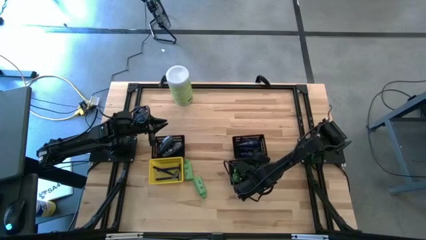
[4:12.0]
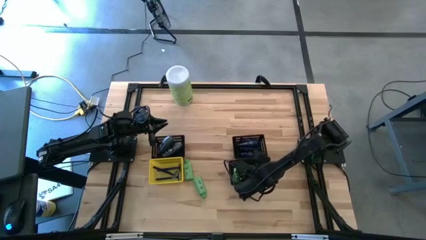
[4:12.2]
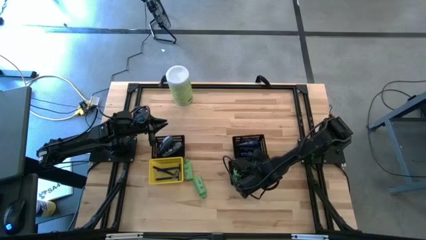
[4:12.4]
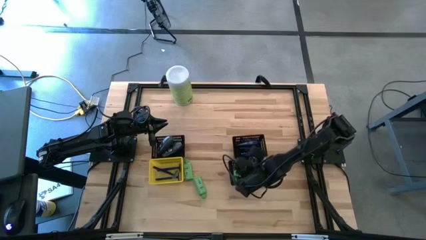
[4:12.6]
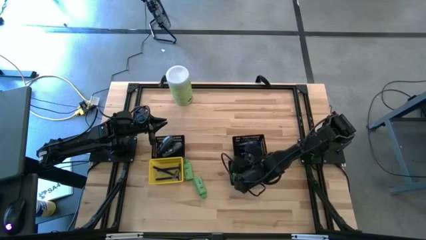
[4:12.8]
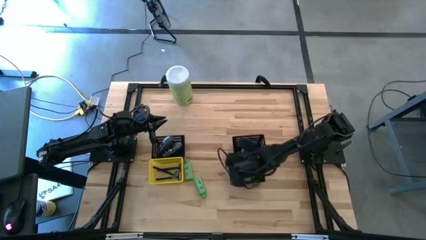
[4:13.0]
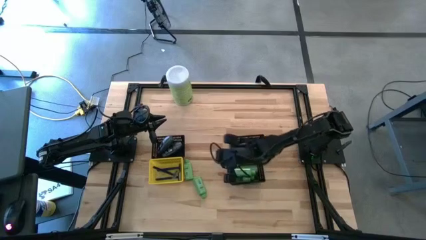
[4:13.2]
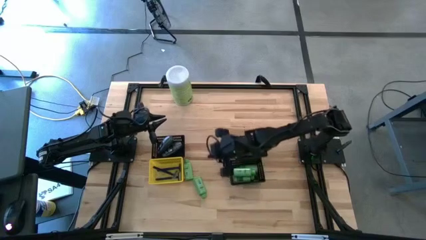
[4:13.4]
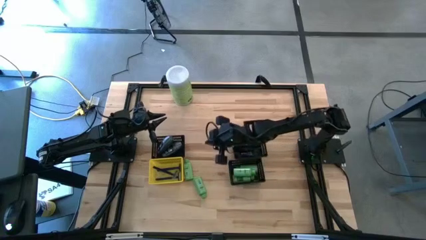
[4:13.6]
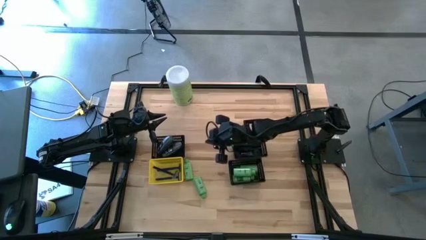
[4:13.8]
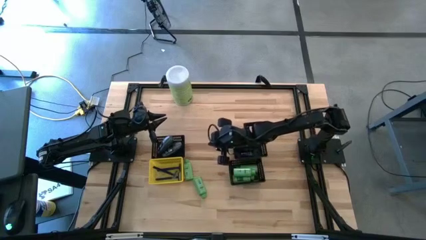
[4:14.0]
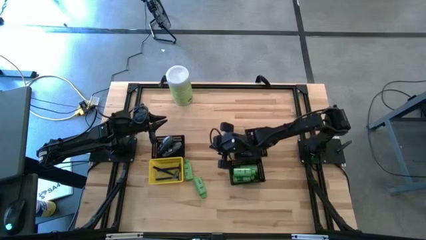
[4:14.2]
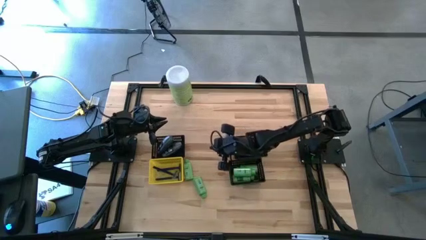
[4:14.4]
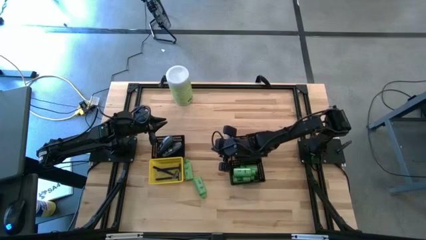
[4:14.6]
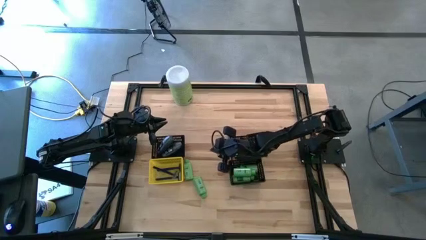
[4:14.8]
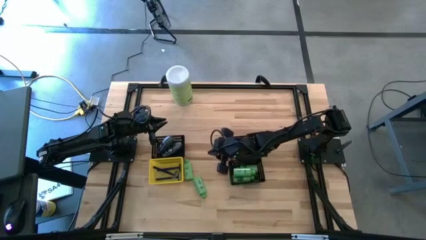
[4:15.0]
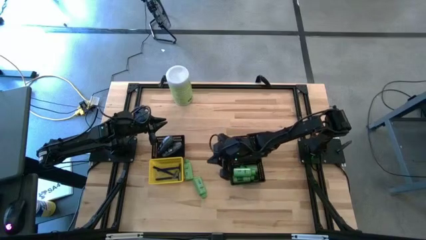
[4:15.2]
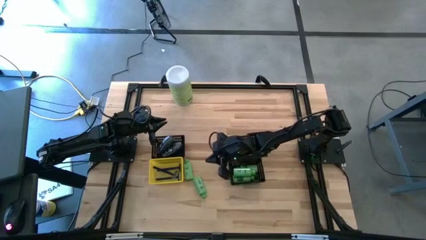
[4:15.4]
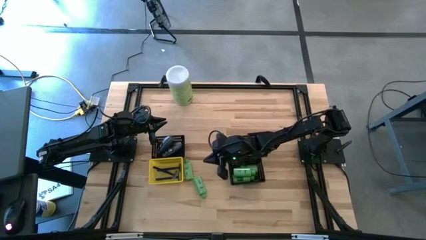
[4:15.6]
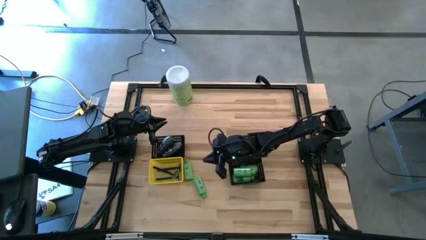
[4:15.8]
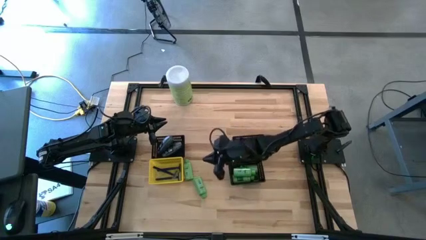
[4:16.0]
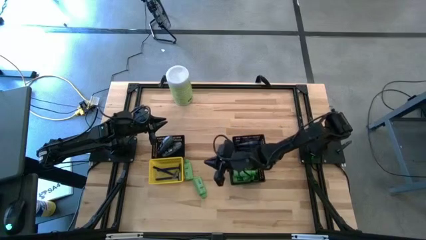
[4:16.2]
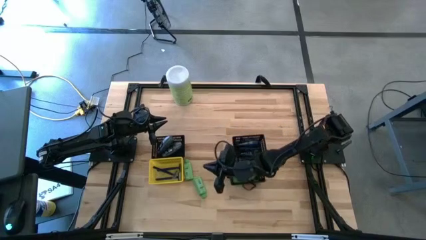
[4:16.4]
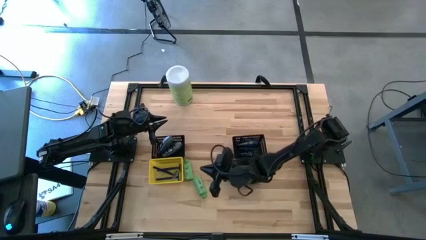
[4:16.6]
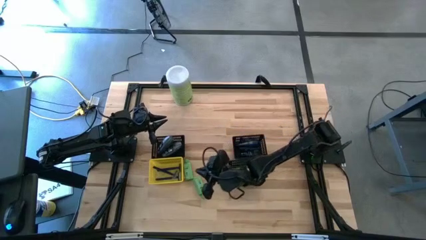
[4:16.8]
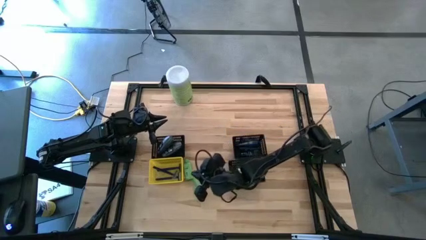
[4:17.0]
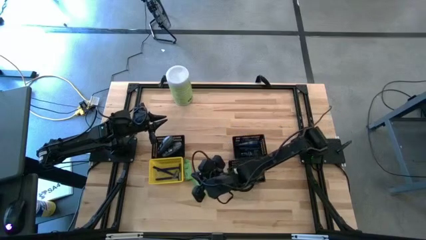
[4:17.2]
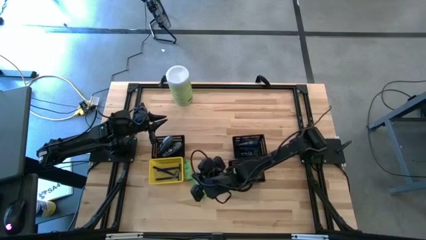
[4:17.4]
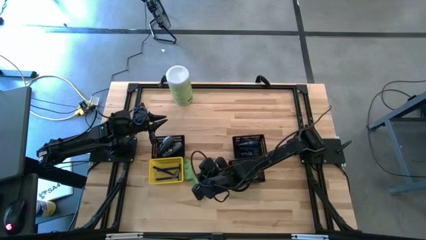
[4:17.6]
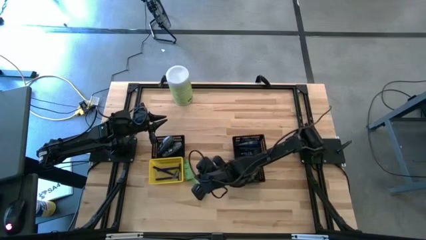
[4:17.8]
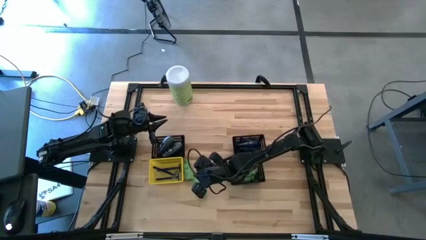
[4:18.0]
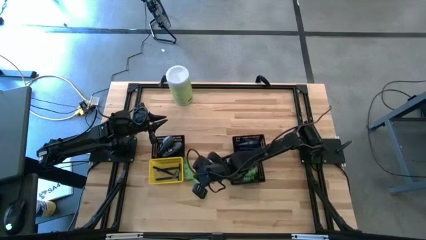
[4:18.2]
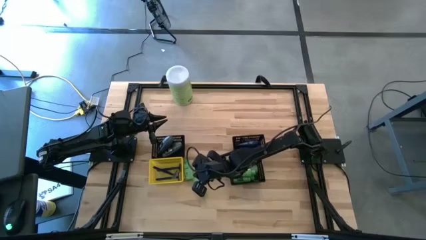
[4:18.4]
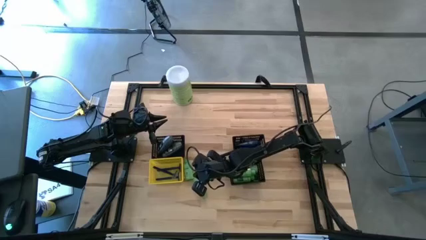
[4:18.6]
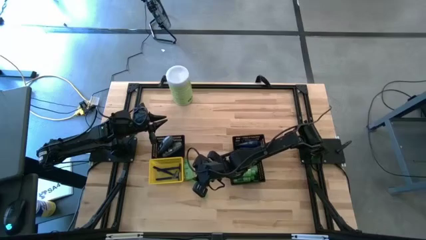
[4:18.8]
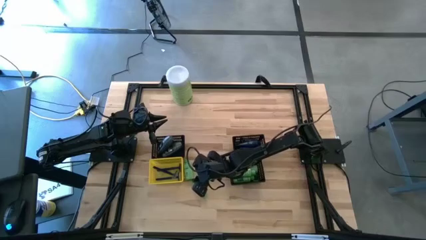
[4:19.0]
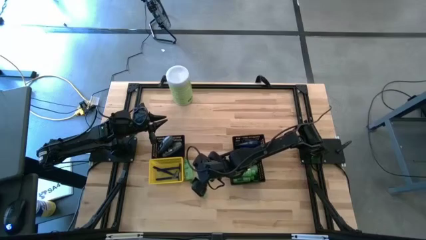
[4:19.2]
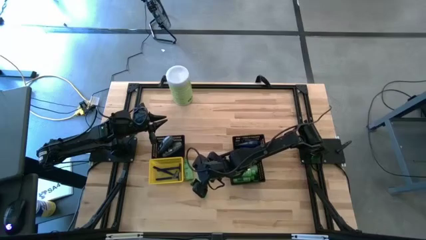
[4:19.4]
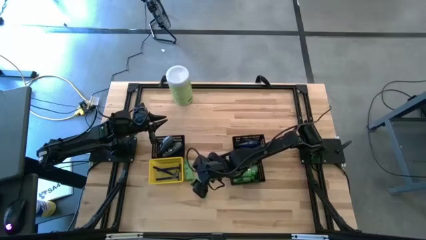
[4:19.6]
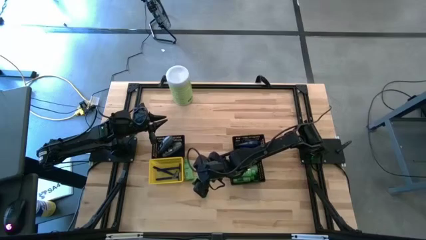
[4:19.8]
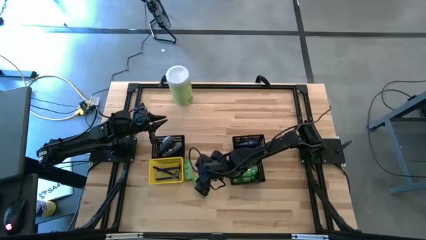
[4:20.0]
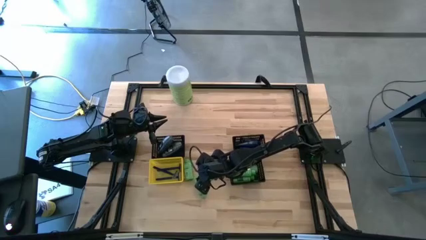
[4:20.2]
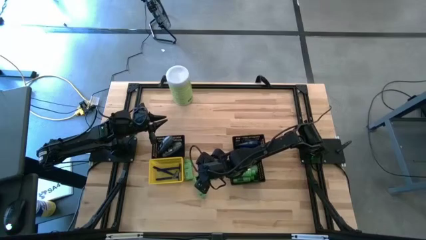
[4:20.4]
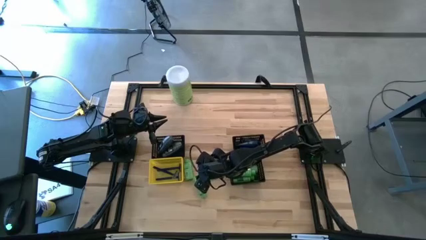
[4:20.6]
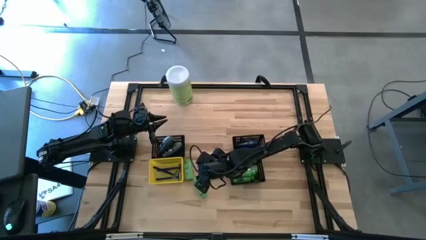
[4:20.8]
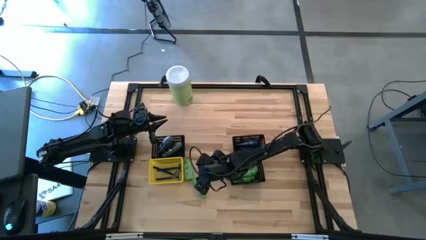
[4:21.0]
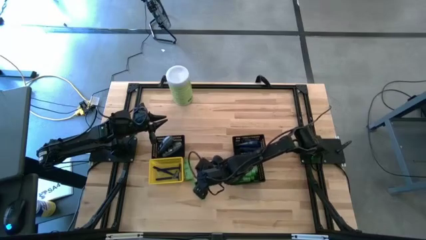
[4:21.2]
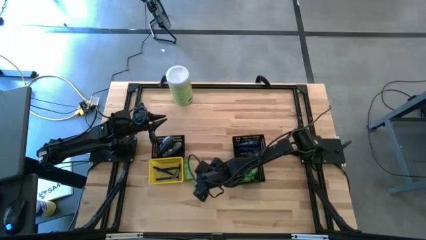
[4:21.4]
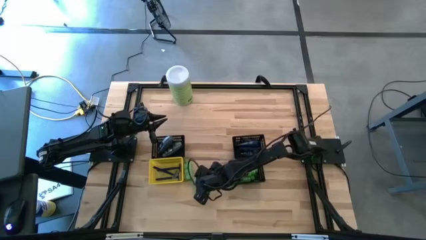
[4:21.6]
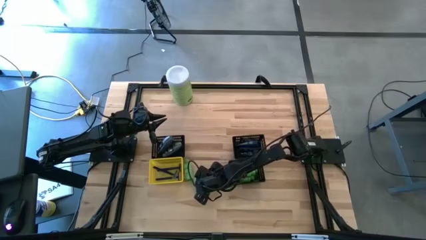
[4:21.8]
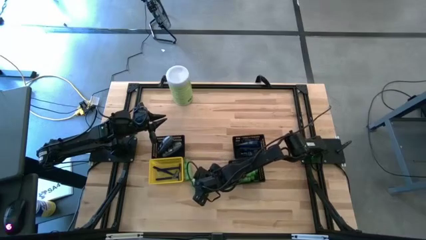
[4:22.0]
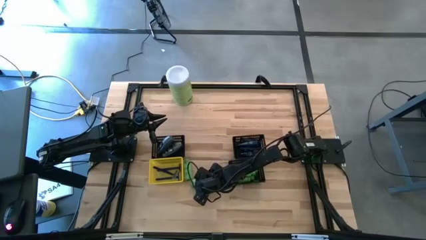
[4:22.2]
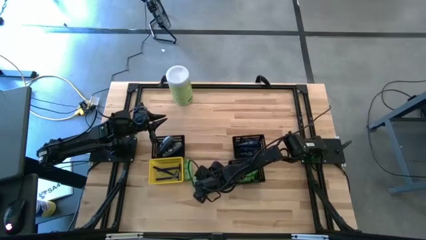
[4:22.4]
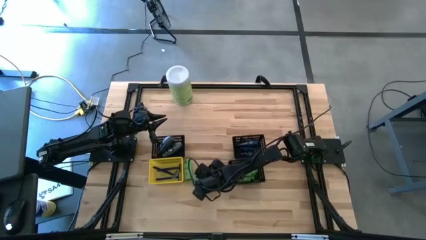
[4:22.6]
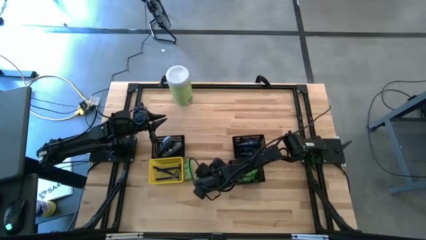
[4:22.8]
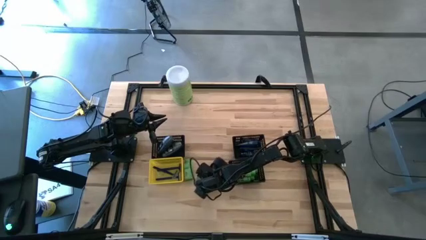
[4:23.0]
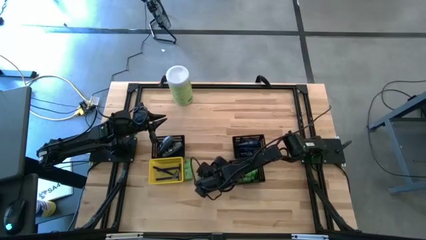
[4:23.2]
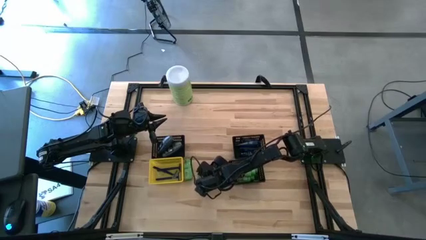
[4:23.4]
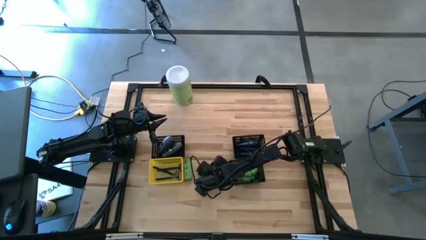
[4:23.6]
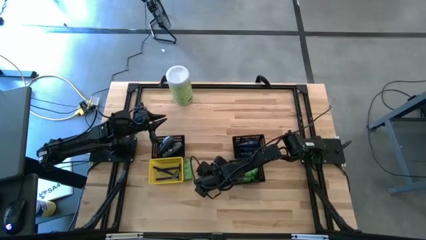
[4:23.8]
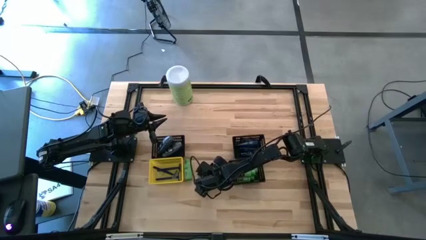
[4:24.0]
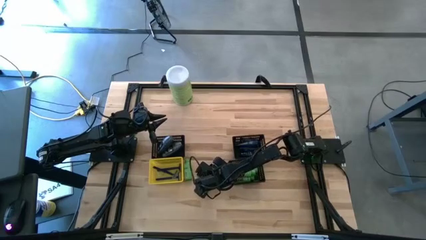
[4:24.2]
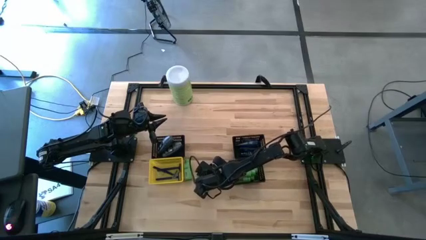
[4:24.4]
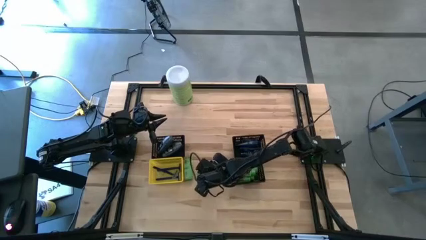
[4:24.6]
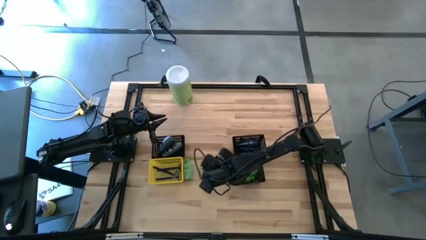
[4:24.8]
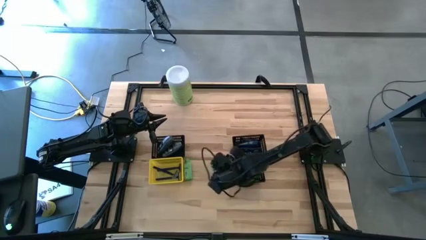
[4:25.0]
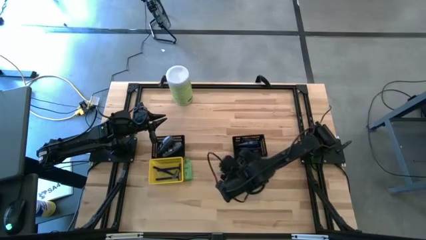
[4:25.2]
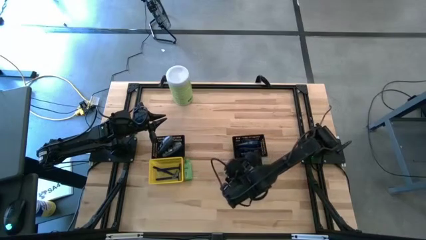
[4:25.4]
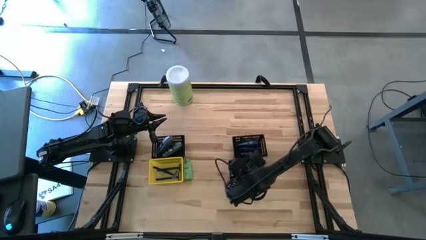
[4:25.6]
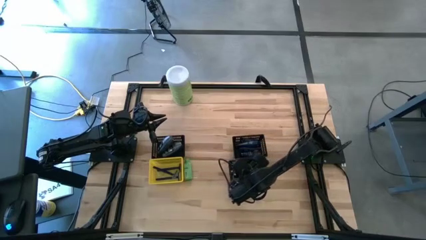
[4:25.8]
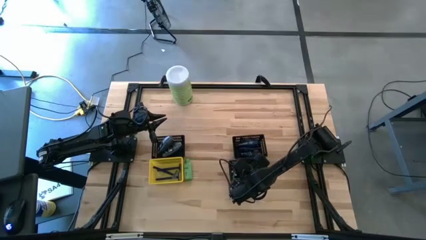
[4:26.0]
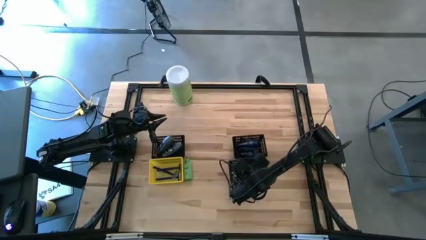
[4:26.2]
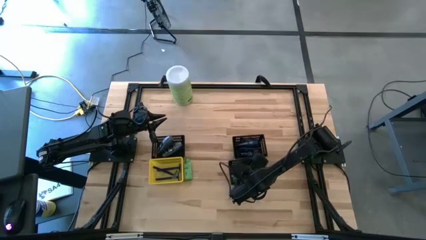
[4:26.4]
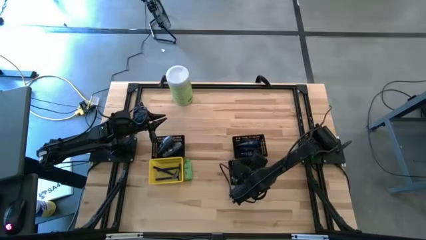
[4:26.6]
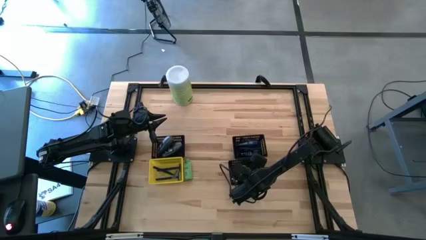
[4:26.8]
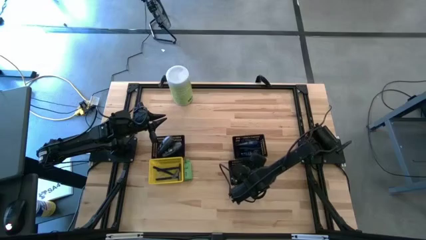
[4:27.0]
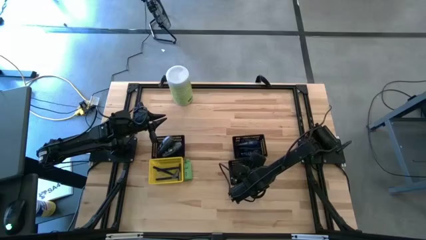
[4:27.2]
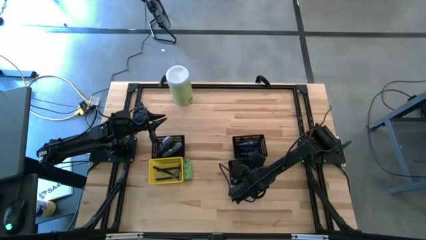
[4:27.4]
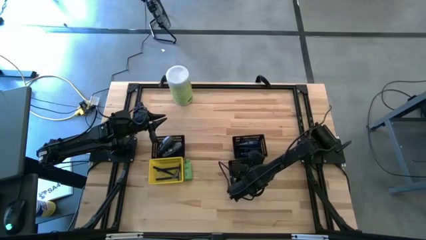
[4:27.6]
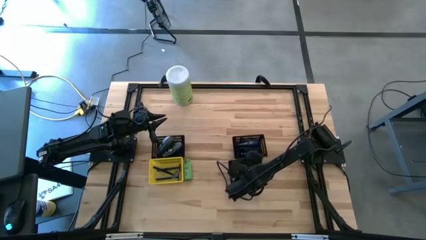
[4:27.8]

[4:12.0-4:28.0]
Task: Pick & Place Travel size toiletries
Put the green shampoo into the bottom right black bin

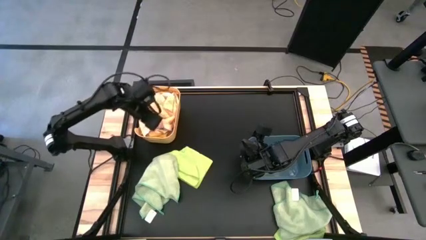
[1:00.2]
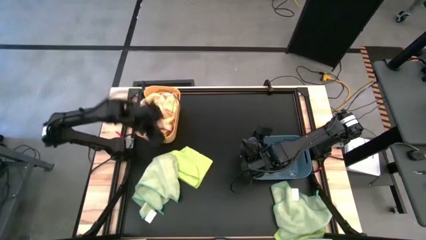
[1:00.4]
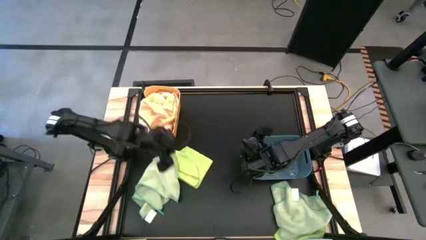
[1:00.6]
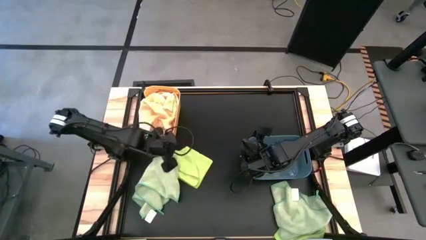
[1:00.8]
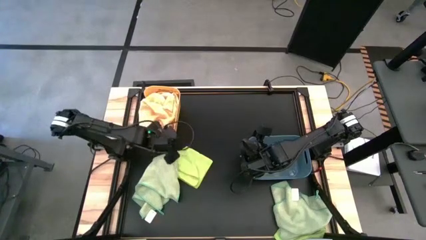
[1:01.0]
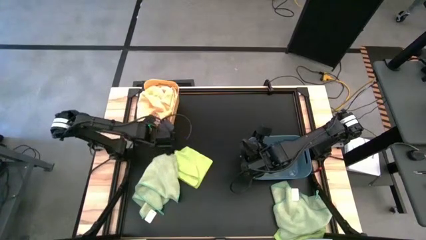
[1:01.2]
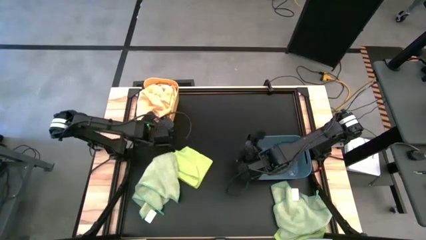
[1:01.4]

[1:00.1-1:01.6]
Task: Sort towels by color in basket
Adjust the yellow bin
